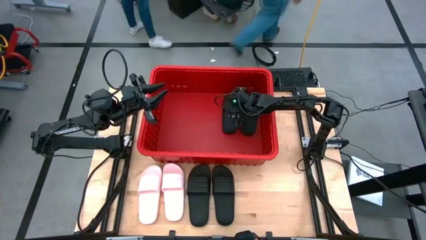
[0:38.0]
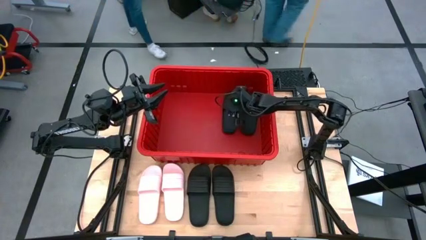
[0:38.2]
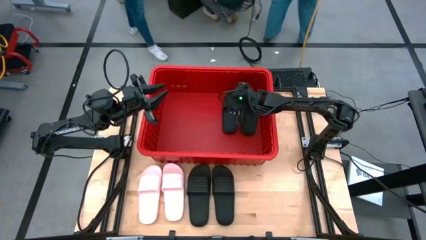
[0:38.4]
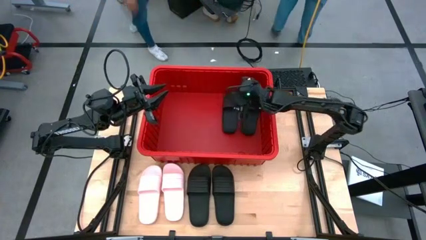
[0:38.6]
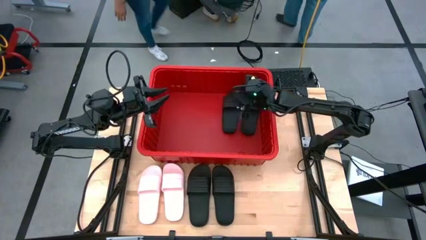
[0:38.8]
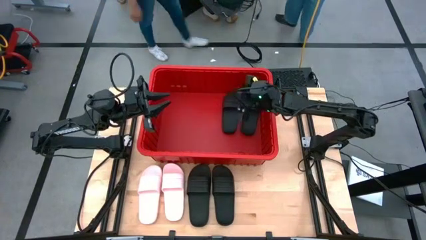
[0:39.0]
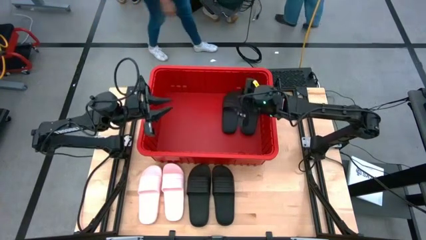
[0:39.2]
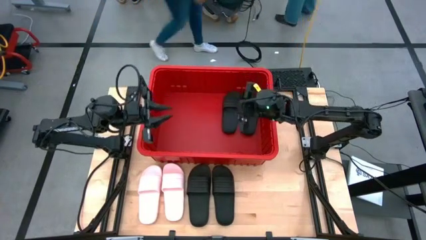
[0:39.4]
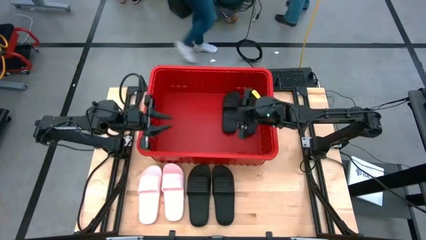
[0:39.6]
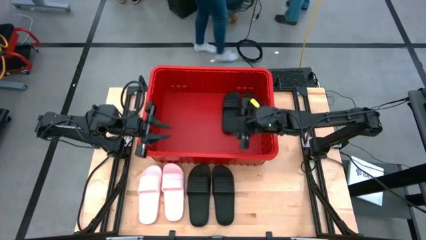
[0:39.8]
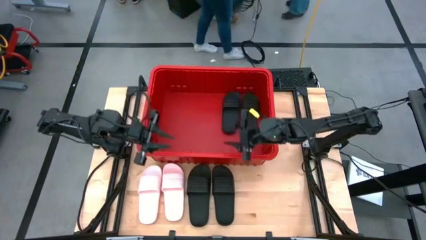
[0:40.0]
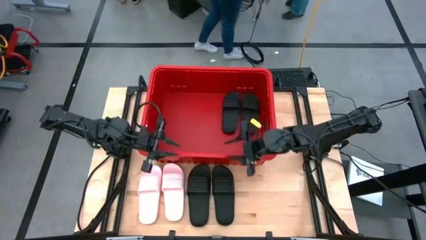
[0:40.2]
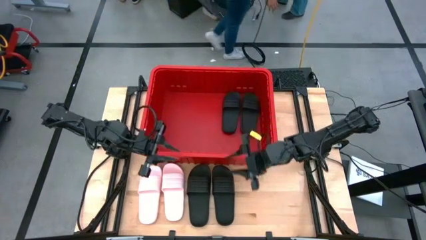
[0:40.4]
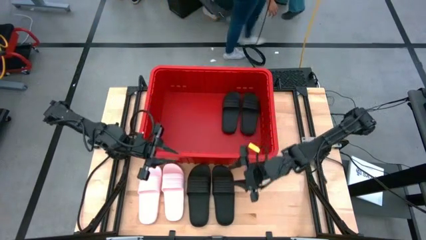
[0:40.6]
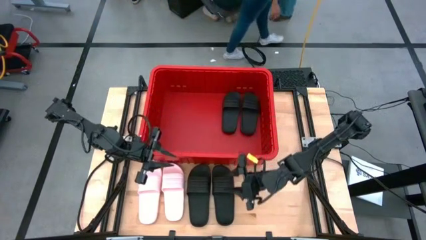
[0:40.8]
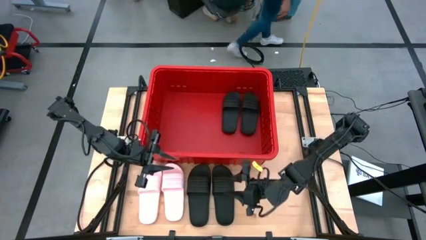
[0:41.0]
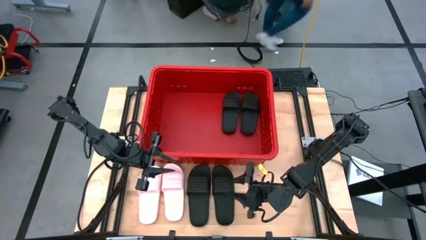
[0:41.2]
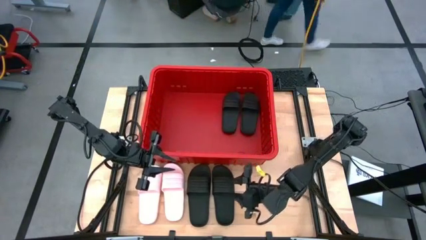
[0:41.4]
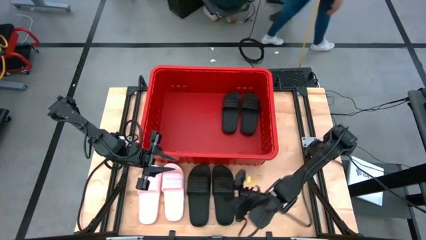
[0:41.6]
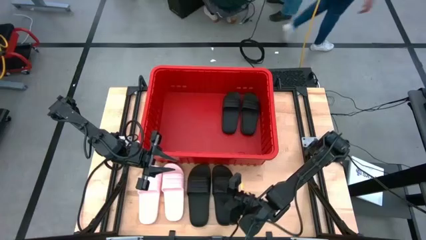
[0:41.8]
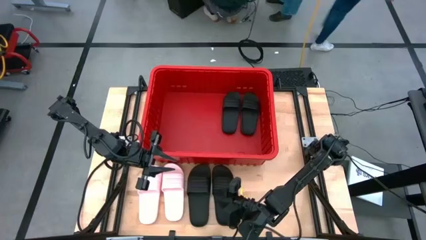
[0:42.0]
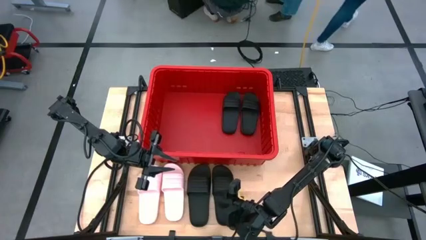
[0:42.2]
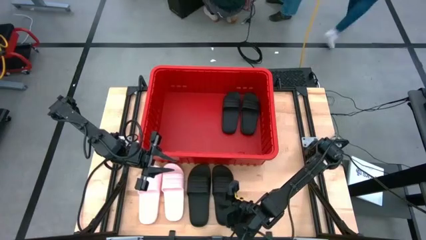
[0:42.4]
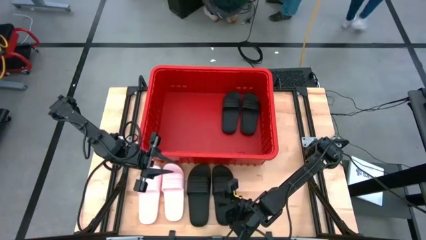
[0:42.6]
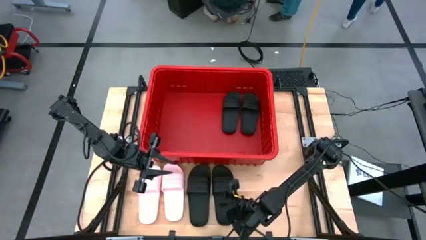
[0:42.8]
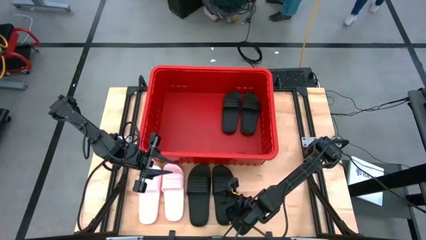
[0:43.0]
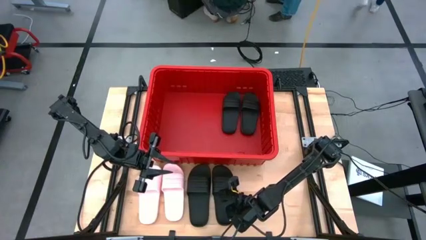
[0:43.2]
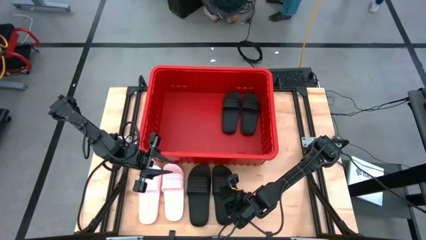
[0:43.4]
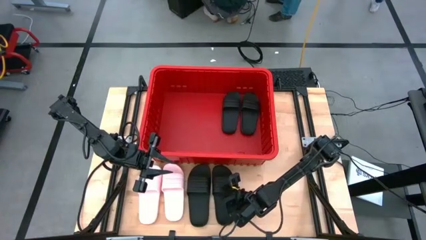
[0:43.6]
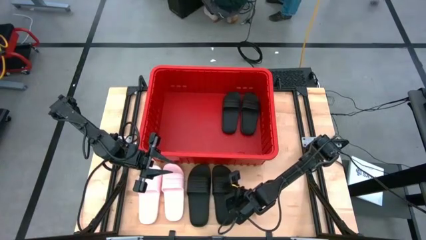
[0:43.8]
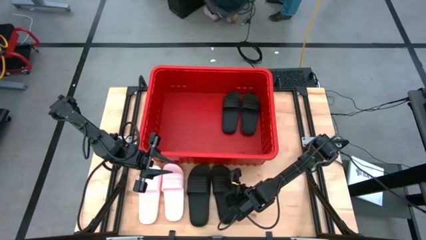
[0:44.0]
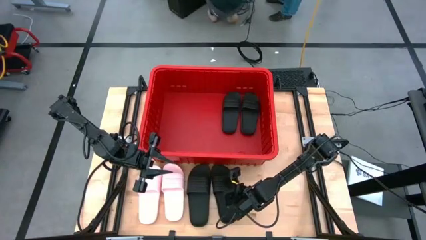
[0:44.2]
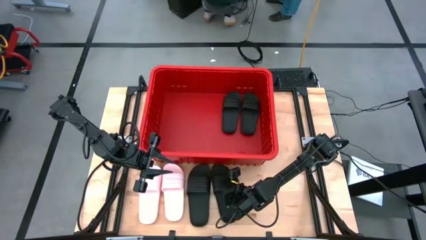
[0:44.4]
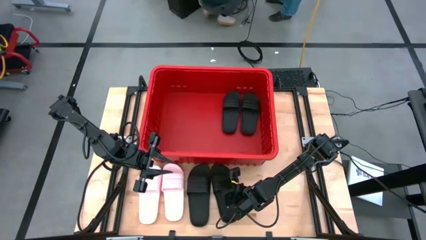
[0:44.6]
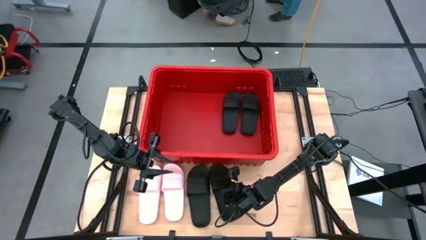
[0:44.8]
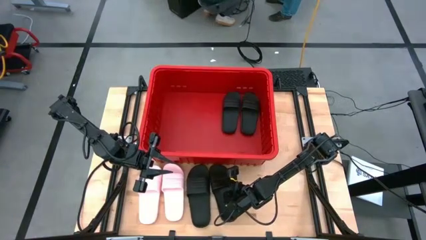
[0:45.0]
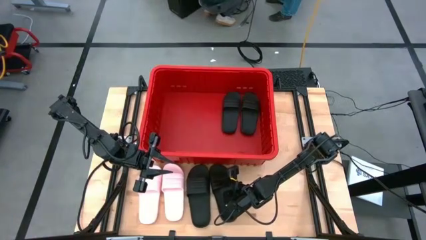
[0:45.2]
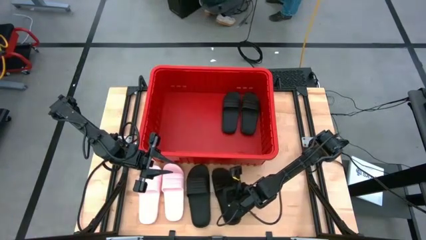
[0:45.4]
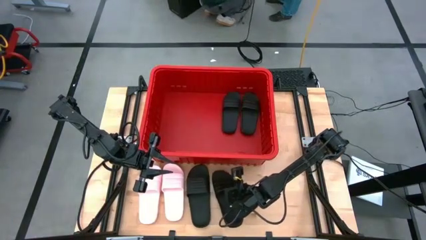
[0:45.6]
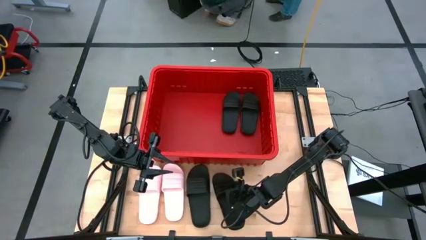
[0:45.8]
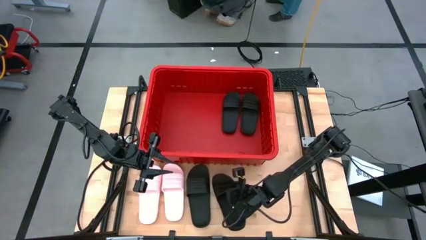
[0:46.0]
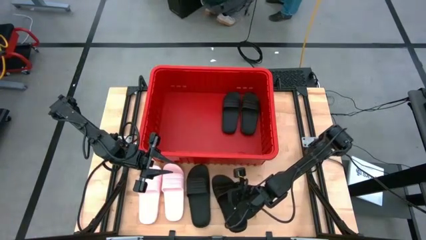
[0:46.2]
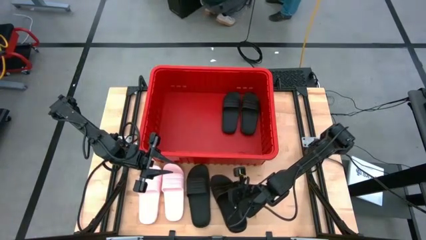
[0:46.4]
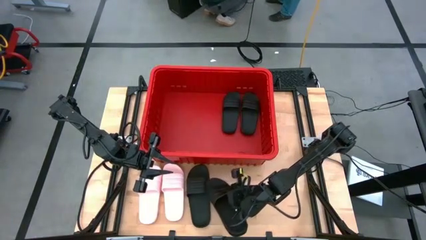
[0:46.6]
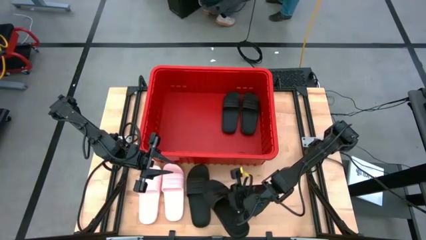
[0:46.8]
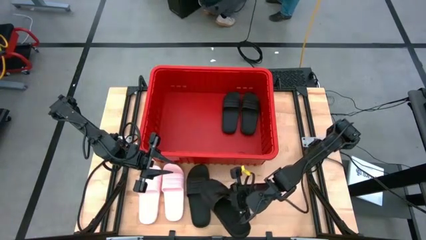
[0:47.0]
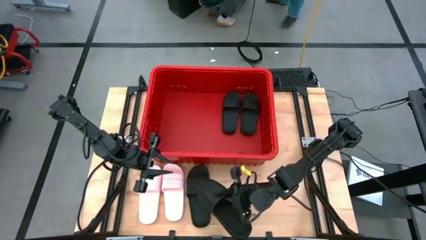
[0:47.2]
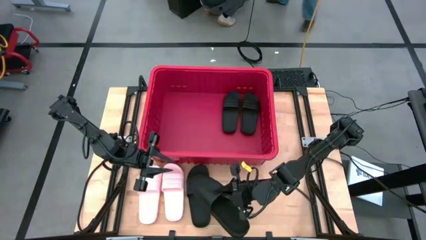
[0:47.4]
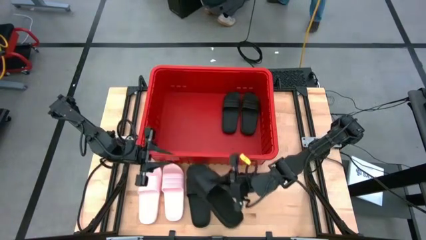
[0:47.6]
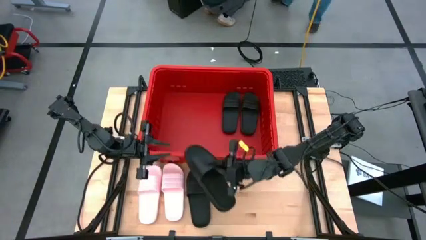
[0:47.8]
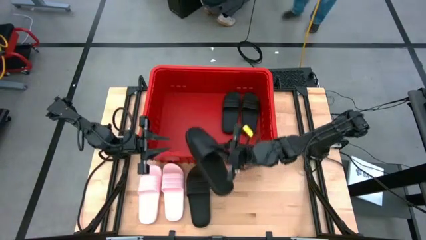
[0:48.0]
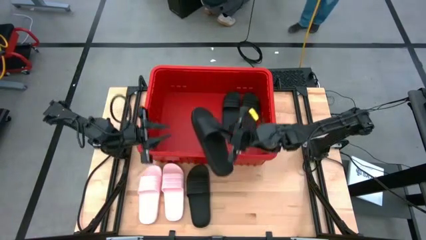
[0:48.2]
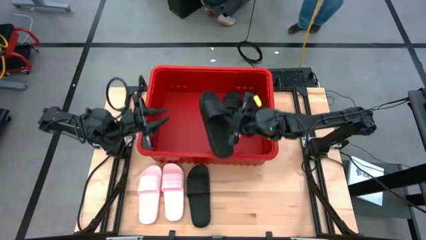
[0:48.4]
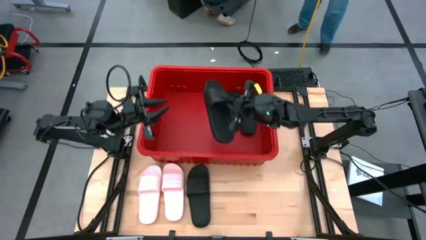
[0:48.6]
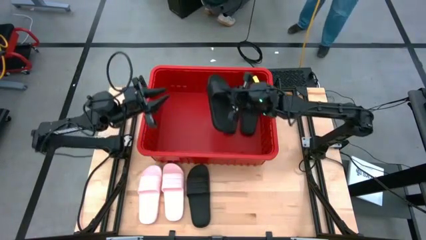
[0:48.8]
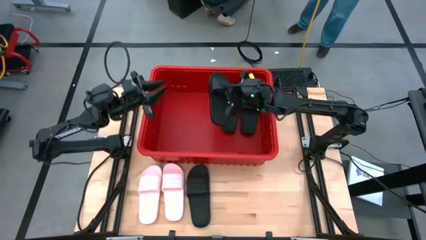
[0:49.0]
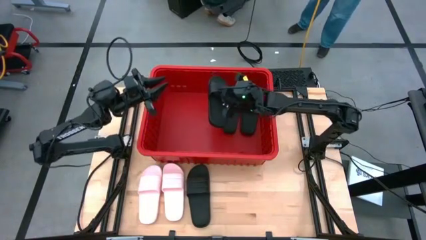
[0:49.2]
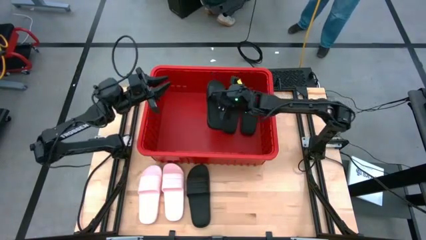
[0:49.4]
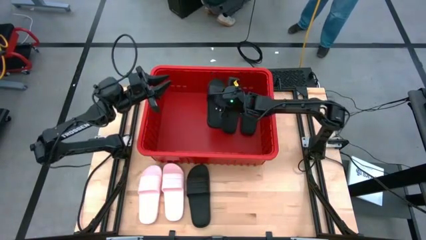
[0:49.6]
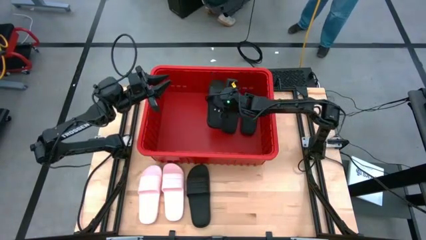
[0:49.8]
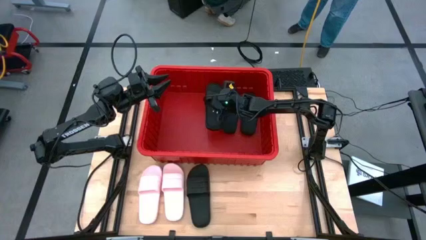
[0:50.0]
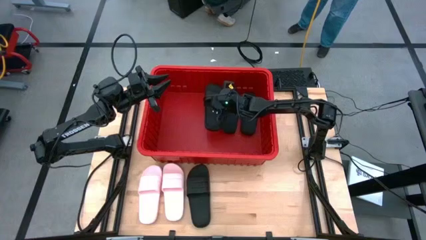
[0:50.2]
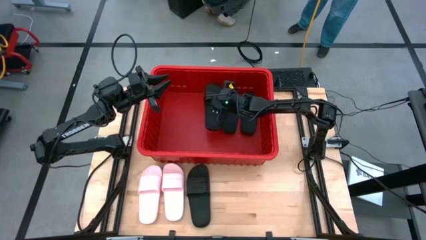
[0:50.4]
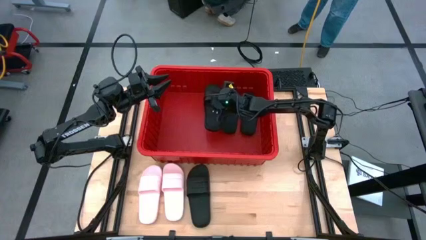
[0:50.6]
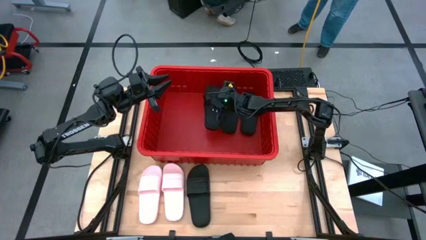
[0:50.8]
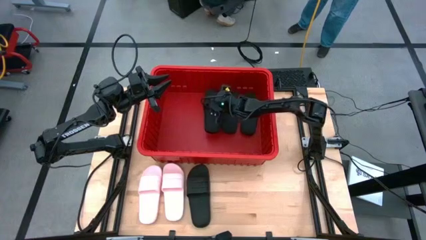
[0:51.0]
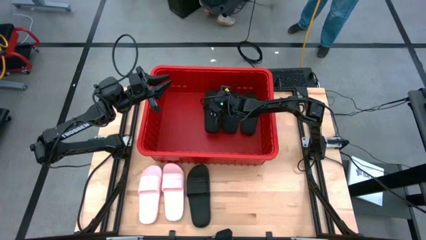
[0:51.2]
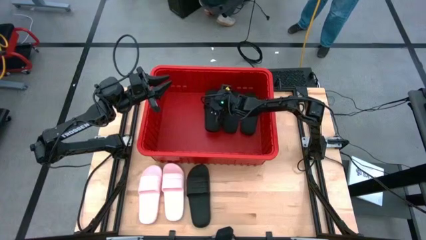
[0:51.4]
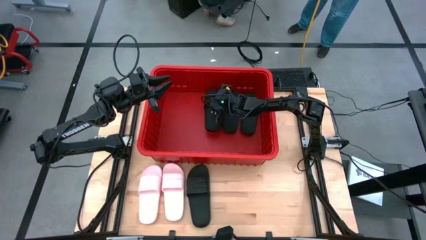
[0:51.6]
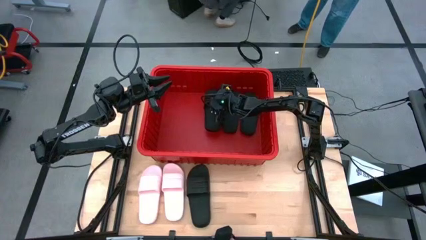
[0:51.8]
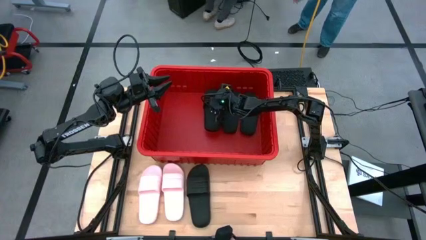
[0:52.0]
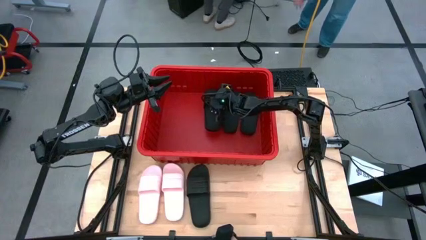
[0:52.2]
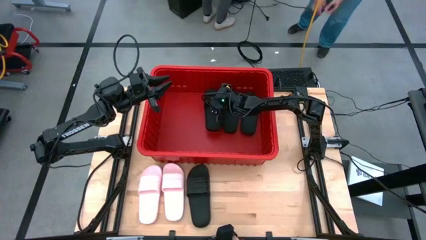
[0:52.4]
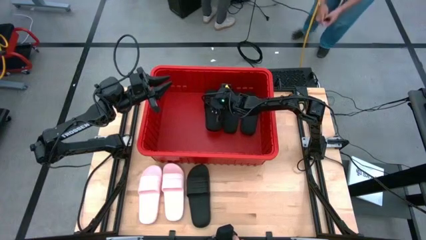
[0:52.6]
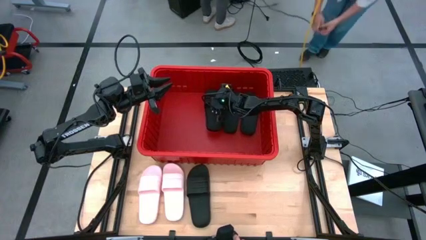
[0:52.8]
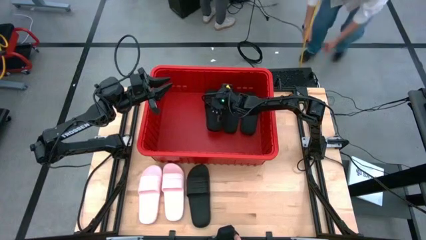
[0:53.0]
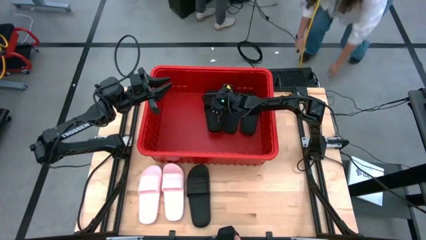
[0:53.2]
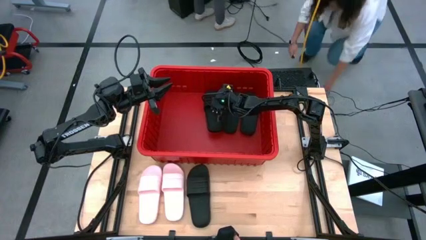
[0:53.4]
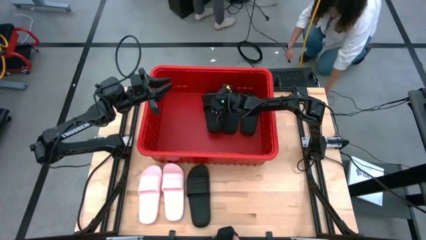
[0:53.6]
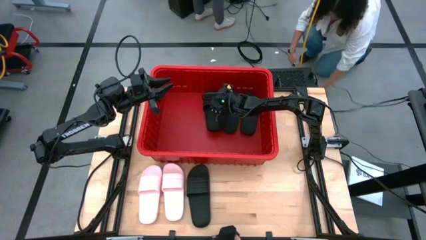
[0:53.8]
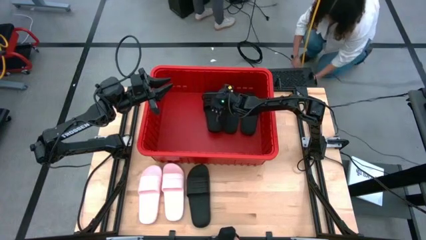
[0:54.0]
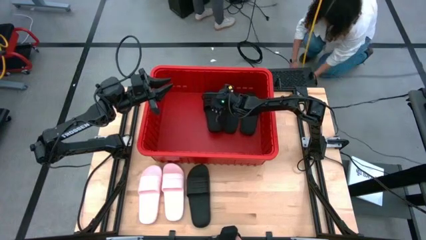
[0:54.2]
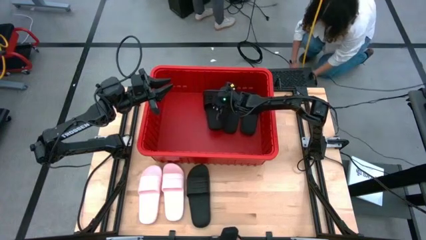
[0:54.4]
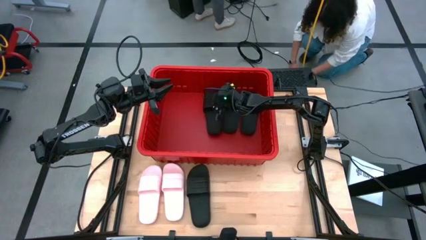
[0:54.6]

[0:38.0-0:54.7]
Task: Pick and place slides into bin
Put the right black slide into the red bin
